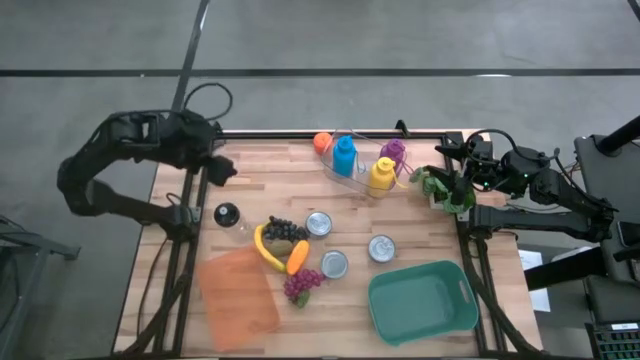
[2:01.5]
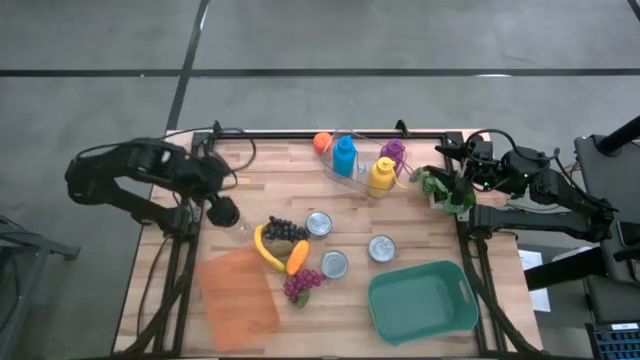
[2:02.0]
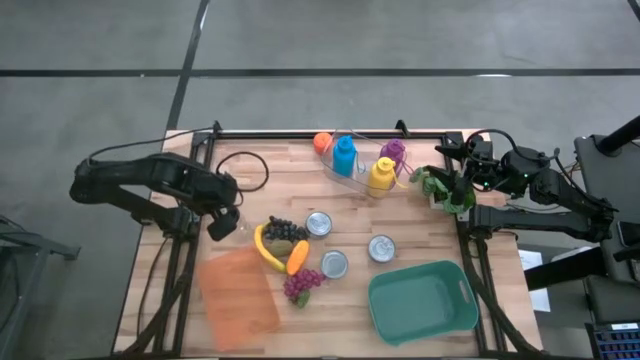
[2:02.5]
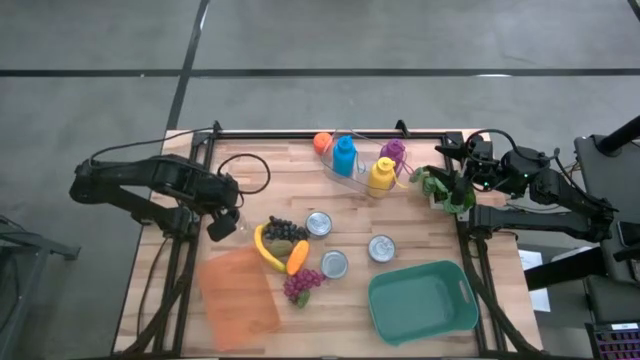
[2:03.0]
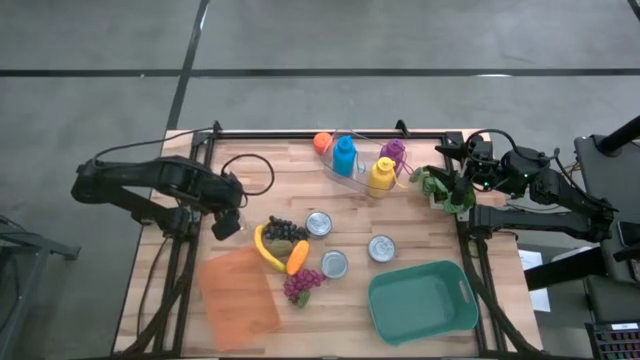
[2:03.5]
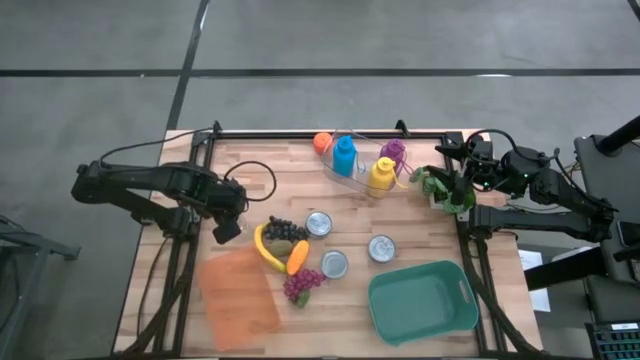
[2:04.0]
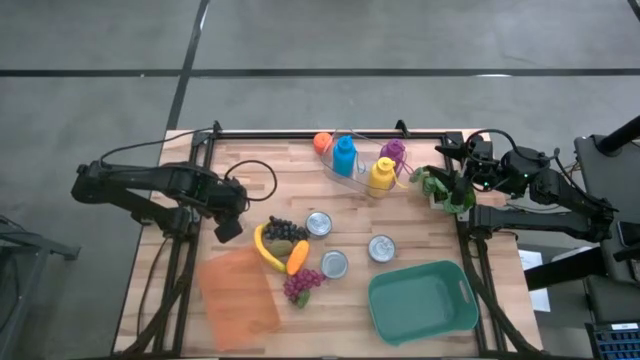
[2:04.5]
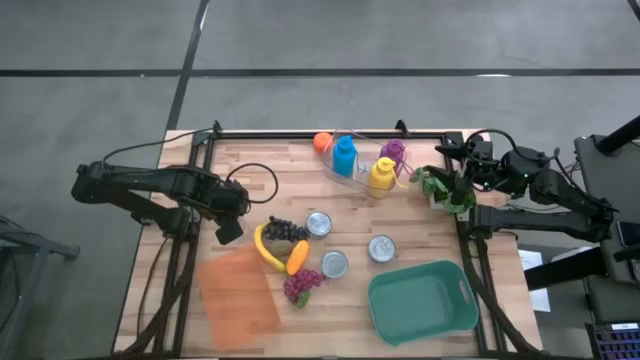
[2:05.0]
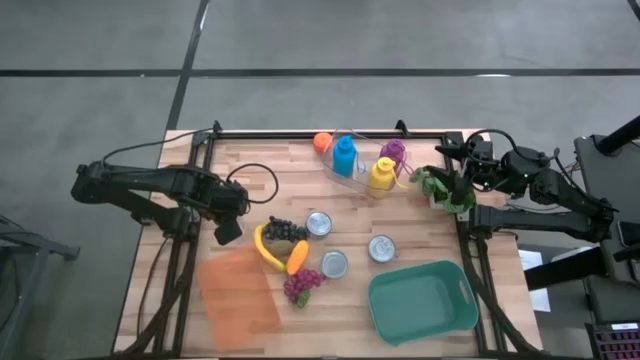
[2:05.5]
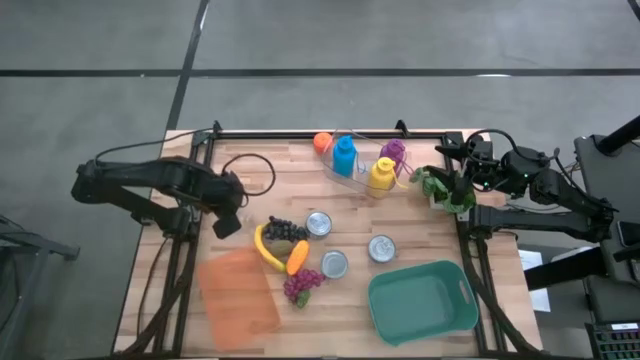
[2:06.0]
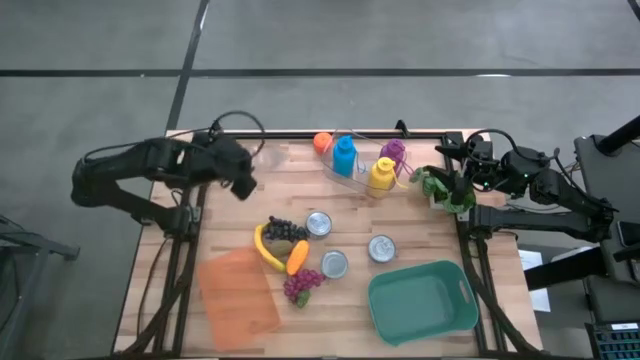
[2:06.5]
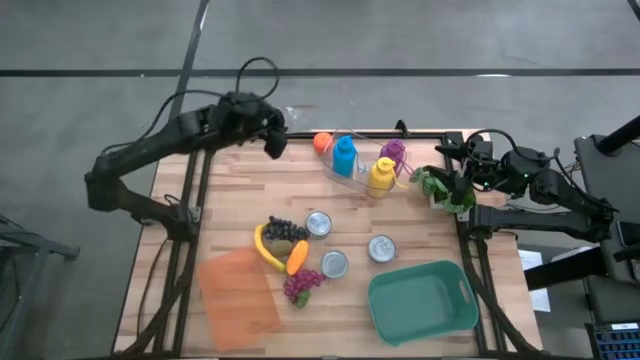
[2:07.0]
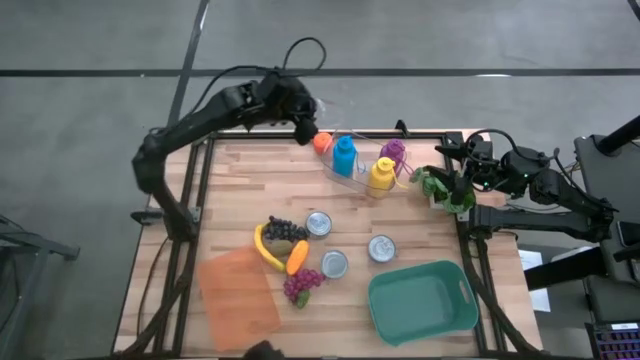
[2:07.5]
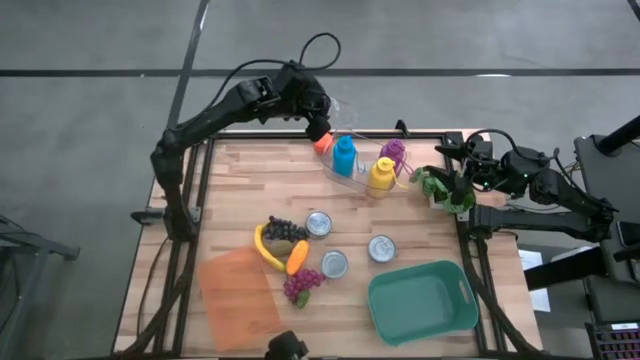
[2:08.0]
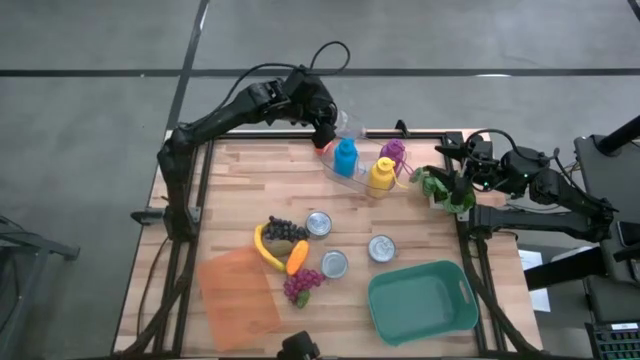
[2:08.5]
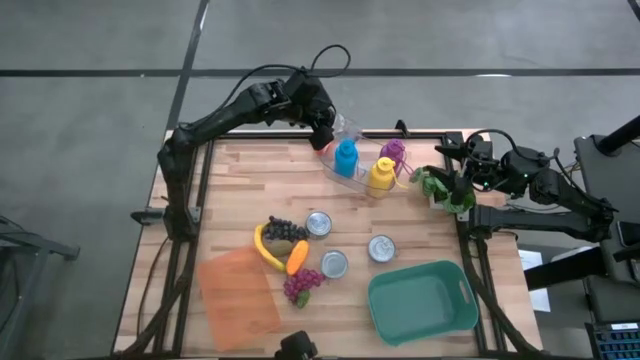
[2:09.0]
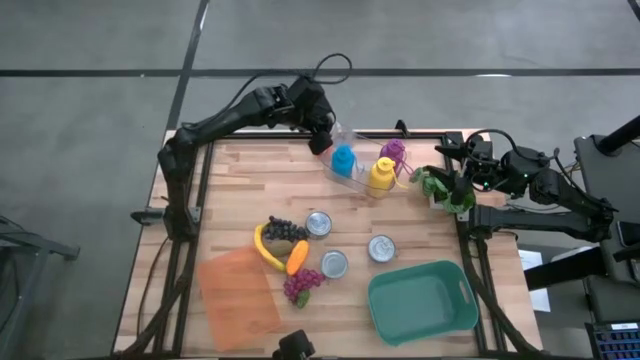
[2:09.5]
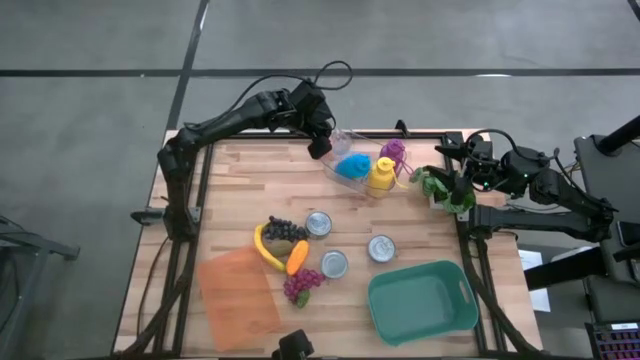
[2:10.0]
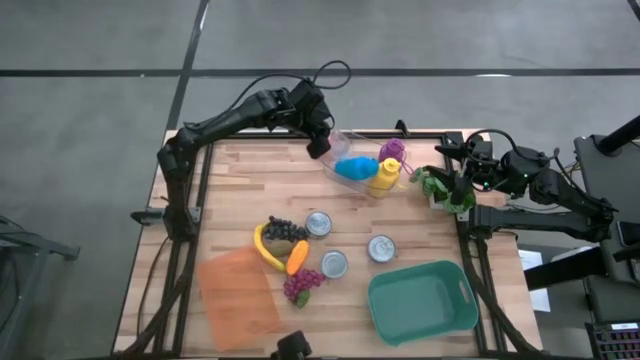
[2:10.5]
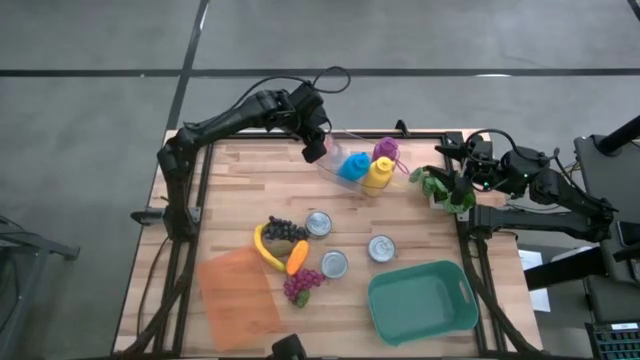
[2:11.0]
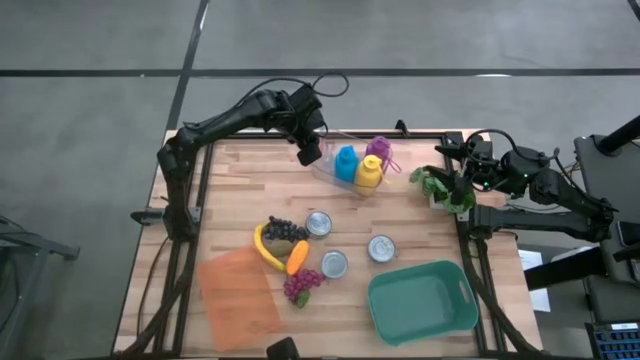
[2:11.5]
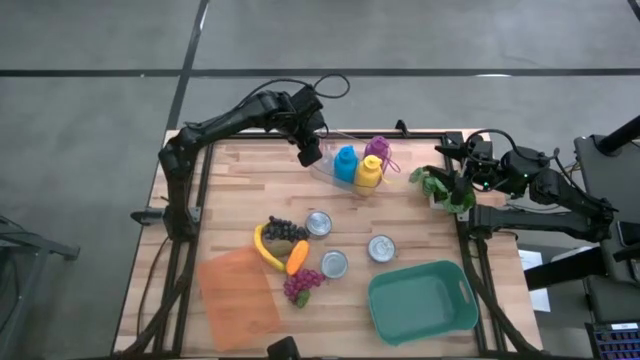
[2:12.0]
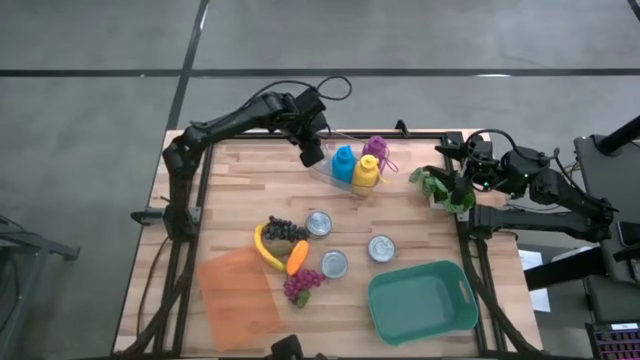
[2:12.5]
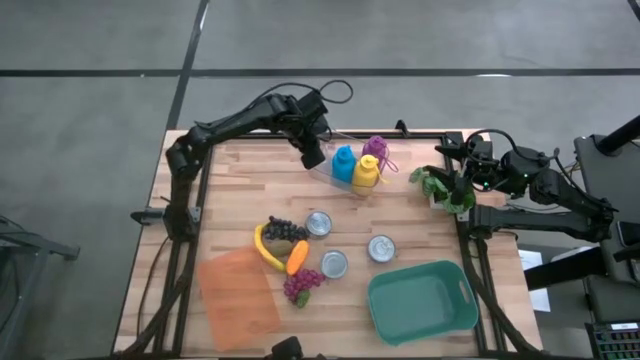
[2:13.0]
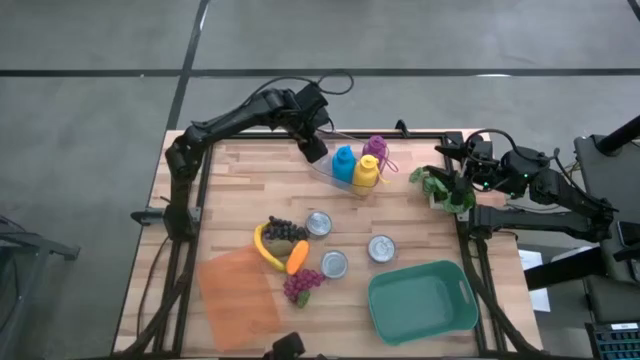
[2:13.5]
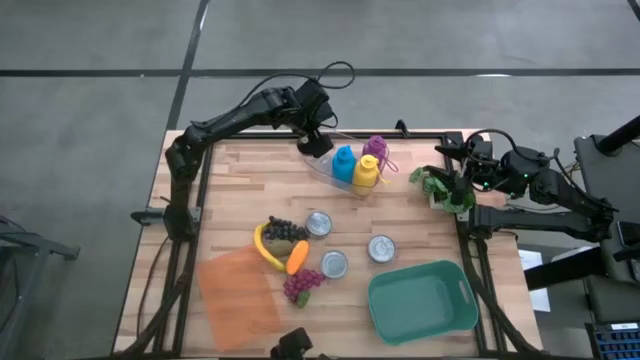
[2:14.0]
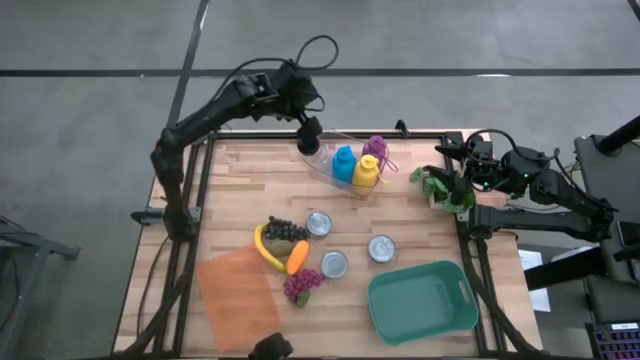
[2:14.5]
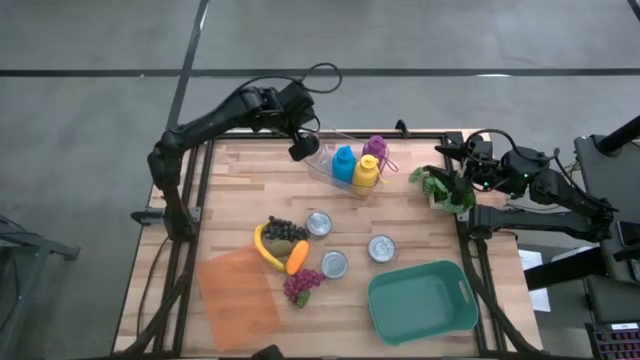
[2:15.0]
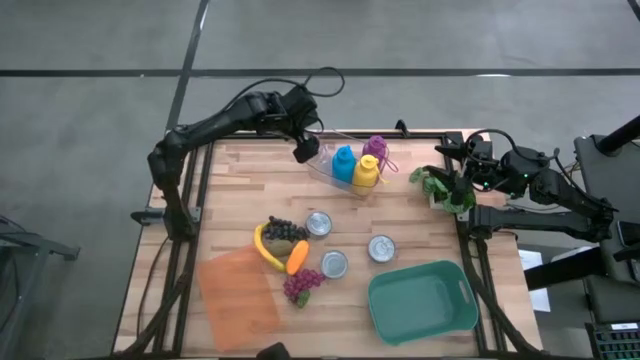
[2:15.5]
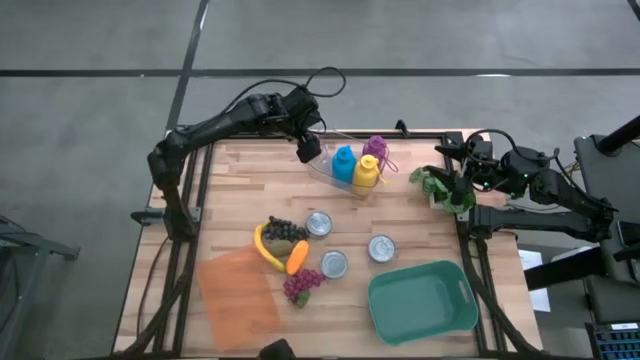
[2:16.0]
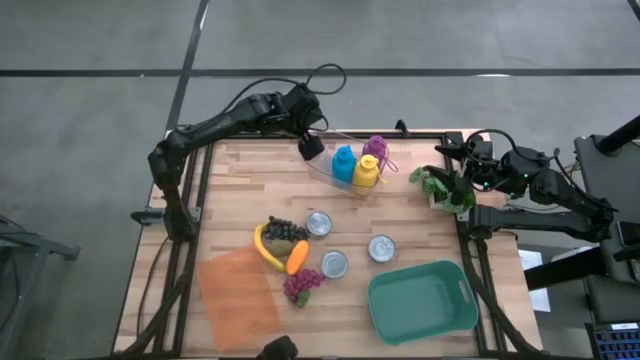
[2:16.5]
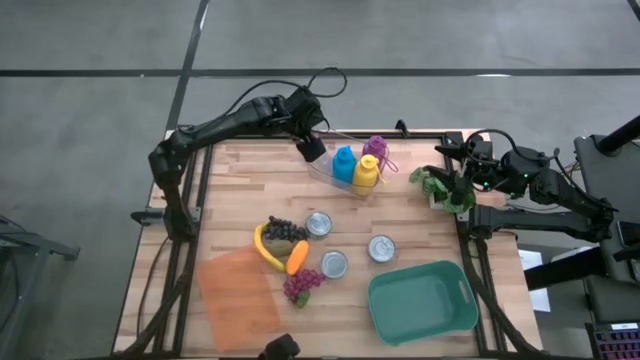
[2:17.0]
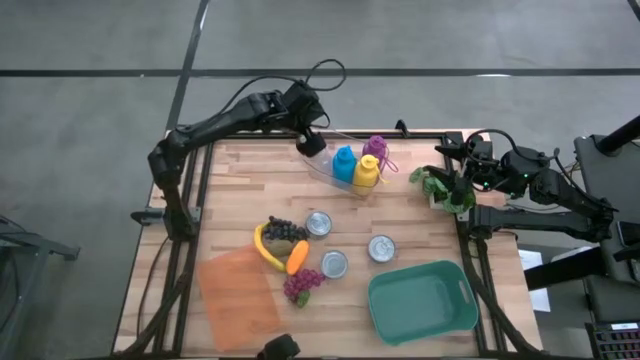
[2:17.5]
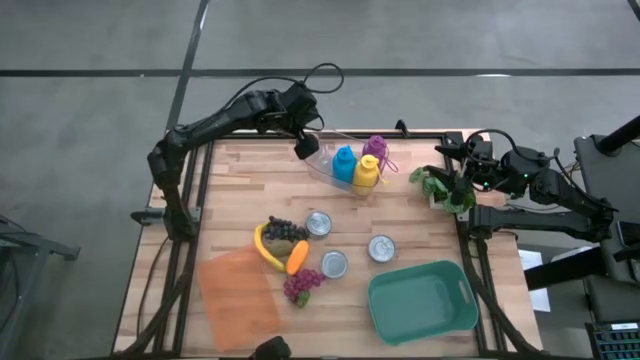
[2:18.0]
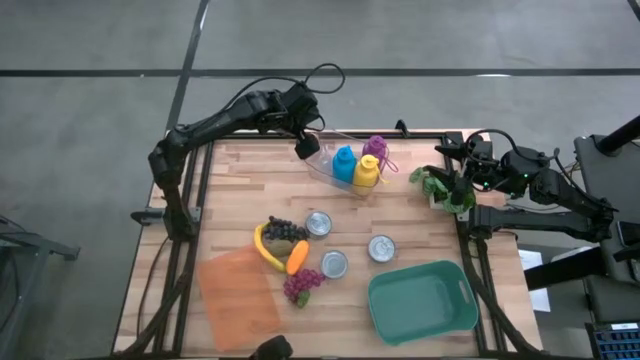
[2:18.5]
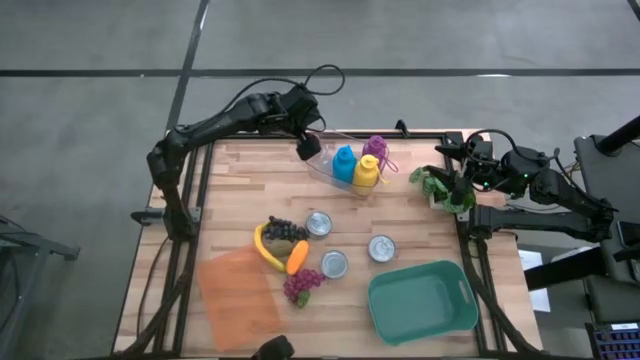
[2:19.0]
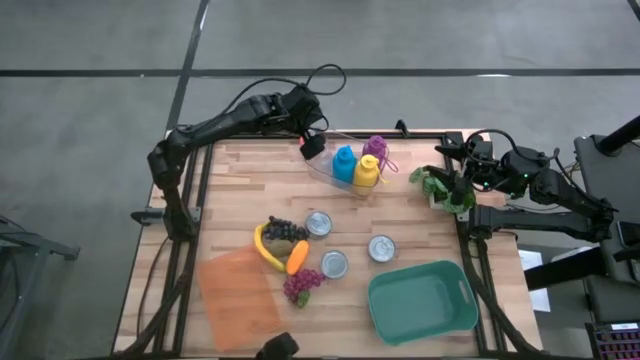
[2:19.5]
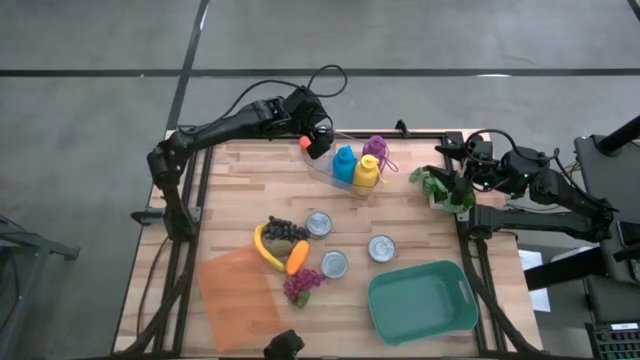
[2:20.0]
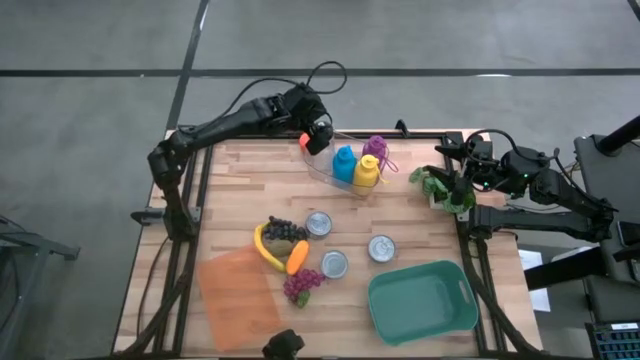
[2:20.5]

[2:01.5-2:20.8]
Task: Pick & Place Food Item
Put the transparent water bottle into the transparent bin

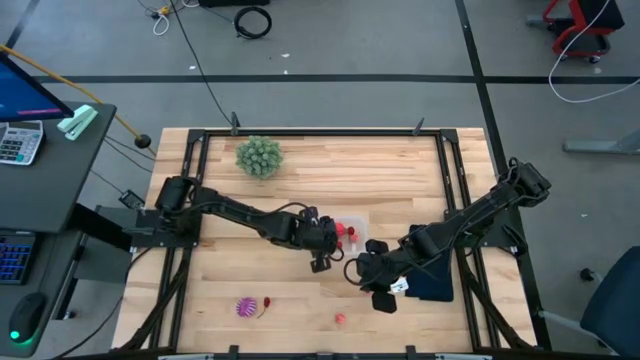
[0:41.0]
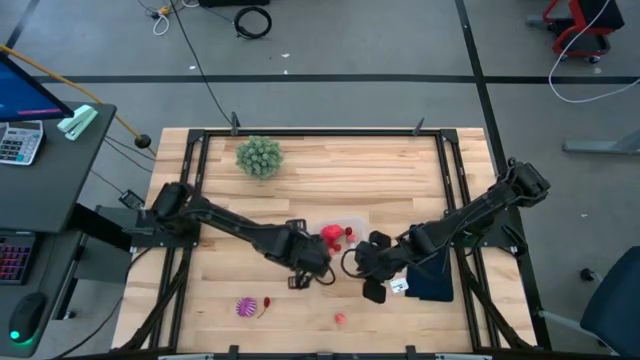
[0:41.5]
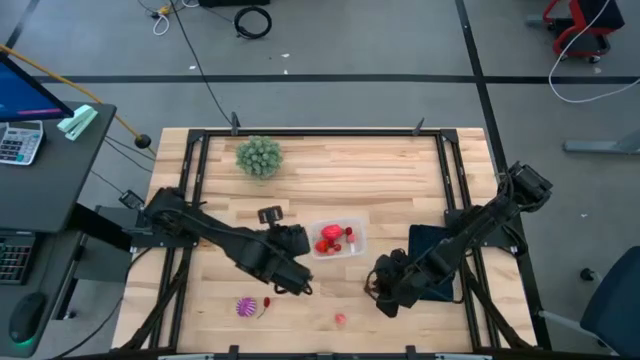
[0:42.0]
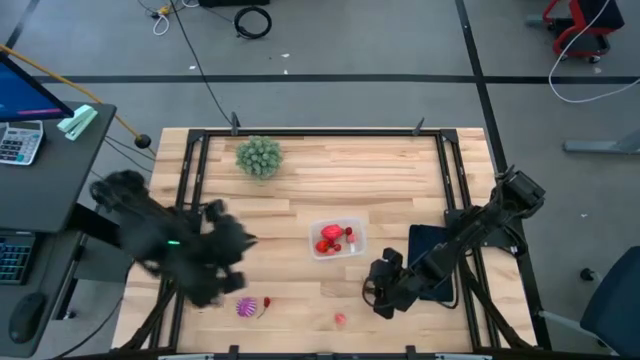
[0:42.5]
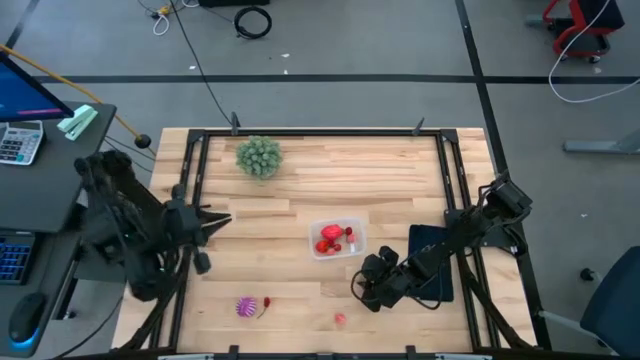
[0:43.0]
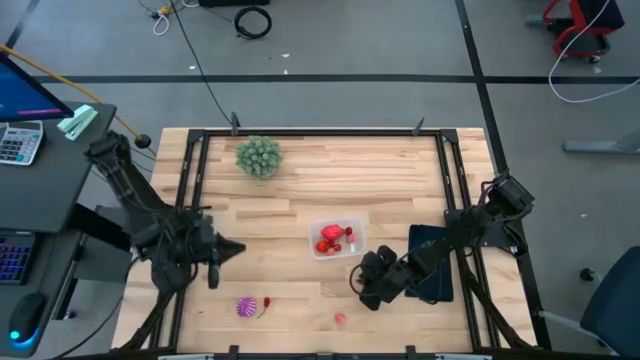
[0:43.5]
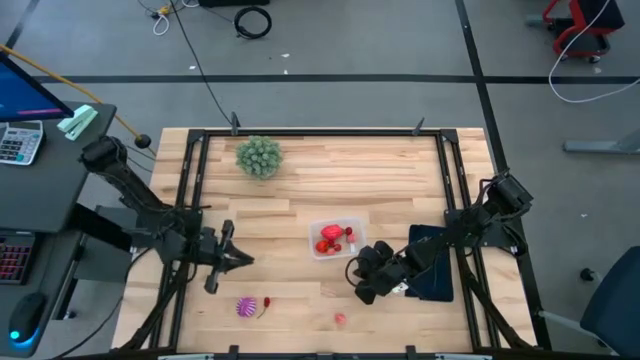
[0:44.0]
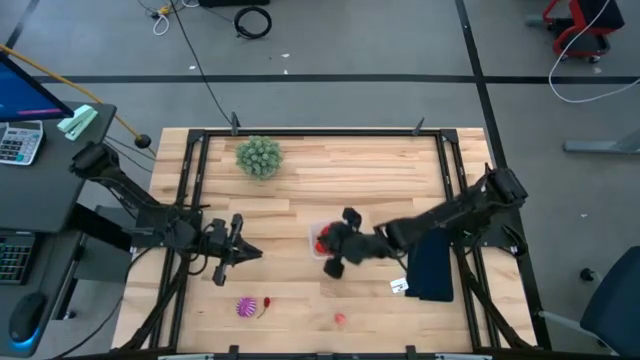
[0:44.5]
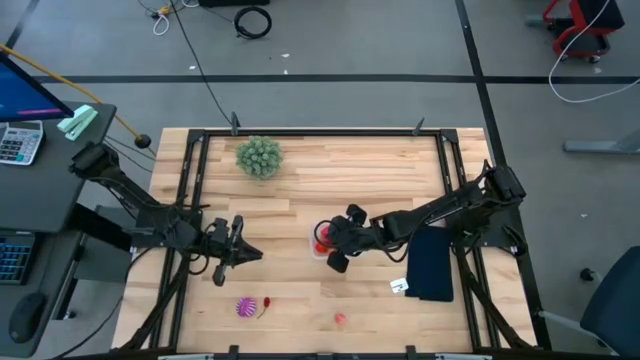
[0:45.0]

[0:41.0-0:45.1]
Task: Pick and placing Produce into tupperware
Put the red cherry into the transparent bin
